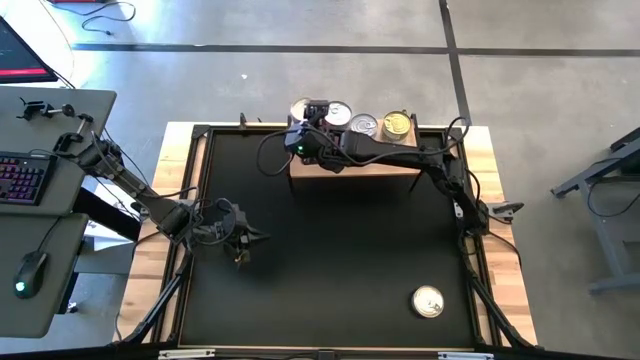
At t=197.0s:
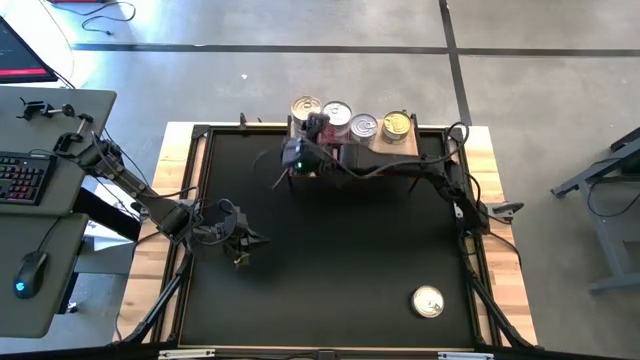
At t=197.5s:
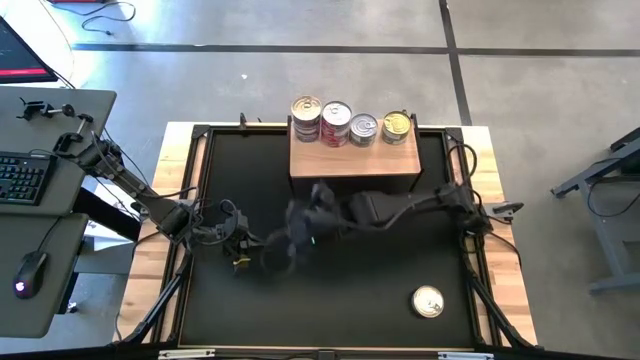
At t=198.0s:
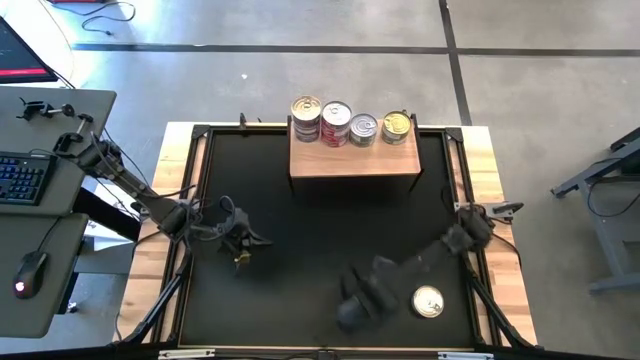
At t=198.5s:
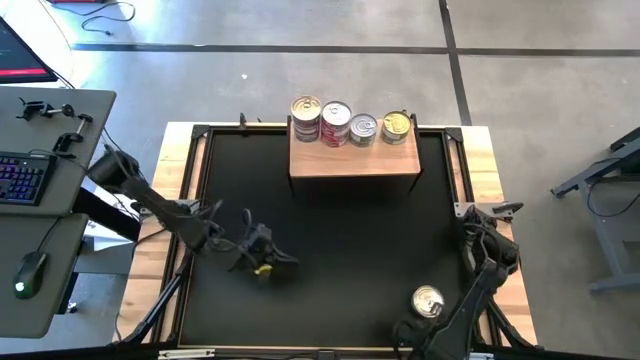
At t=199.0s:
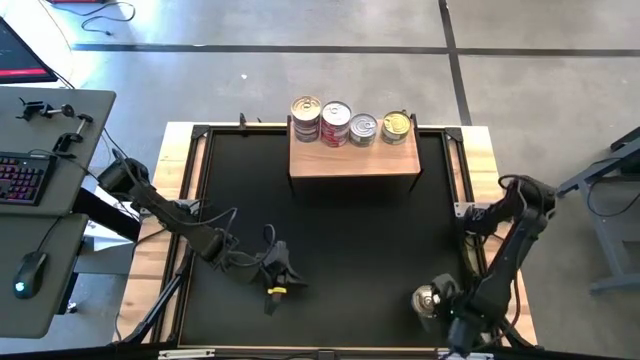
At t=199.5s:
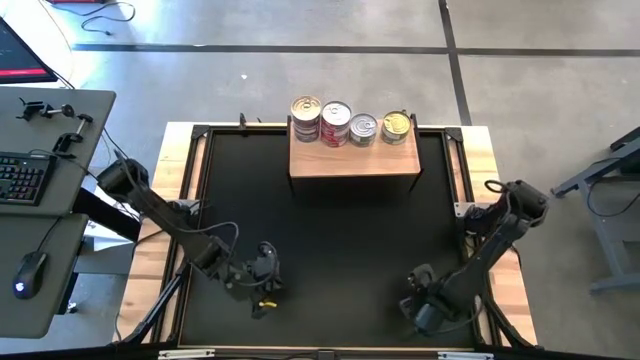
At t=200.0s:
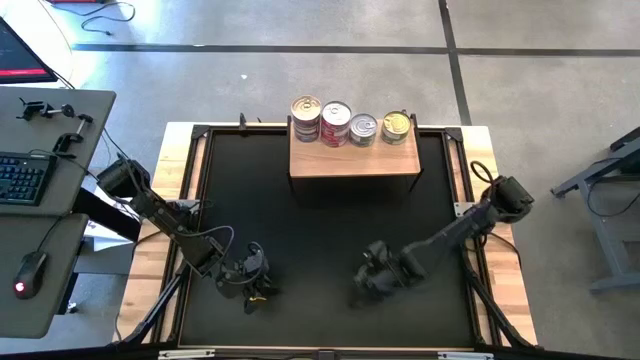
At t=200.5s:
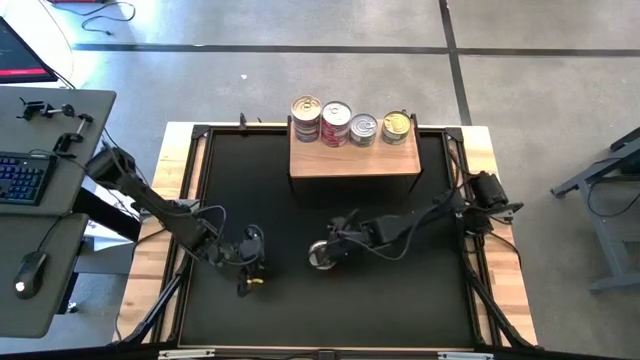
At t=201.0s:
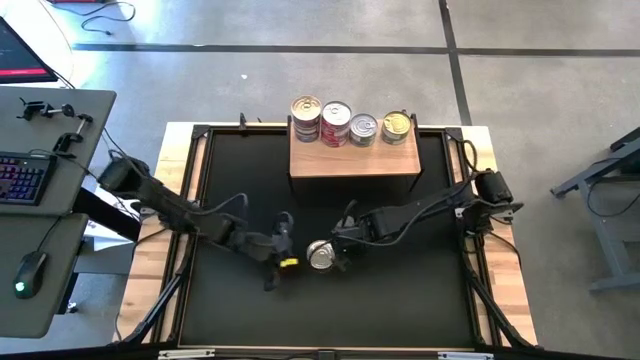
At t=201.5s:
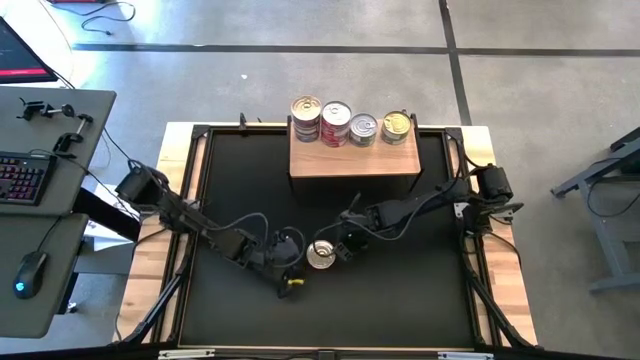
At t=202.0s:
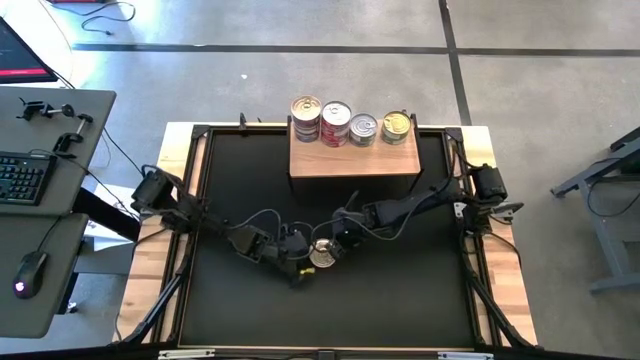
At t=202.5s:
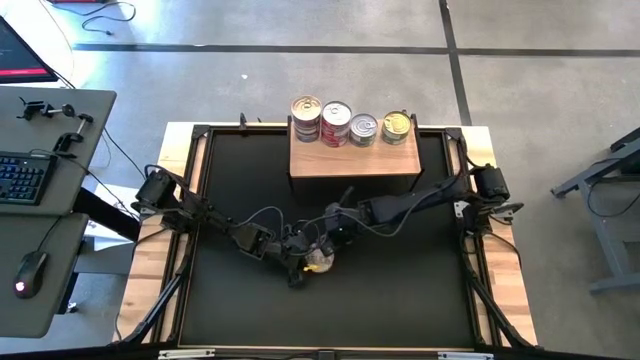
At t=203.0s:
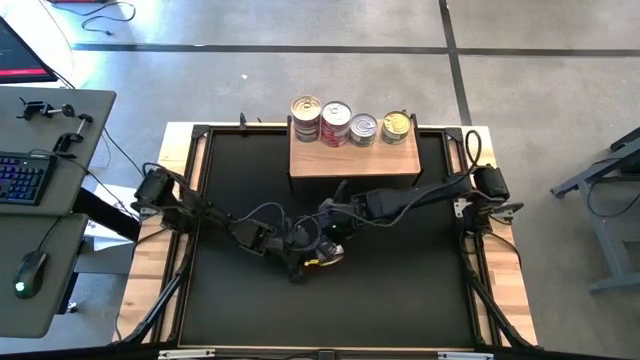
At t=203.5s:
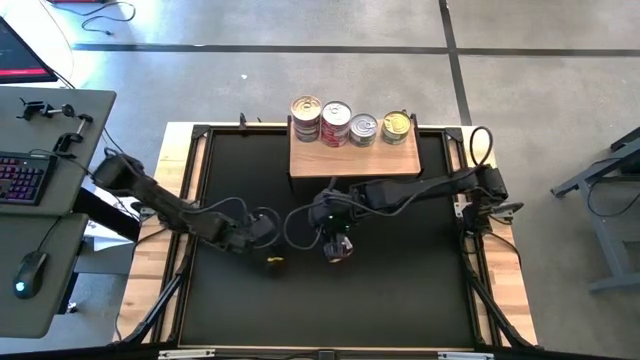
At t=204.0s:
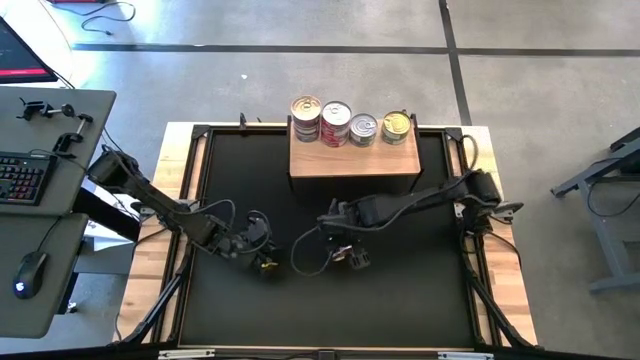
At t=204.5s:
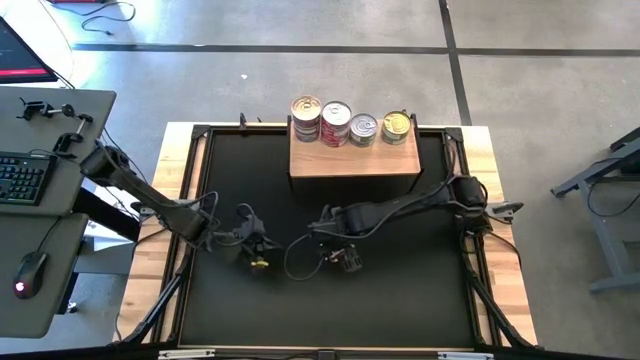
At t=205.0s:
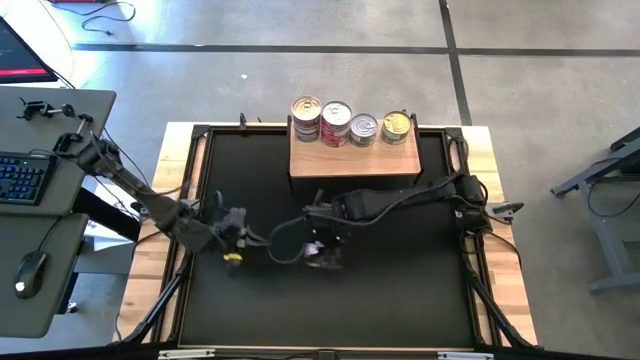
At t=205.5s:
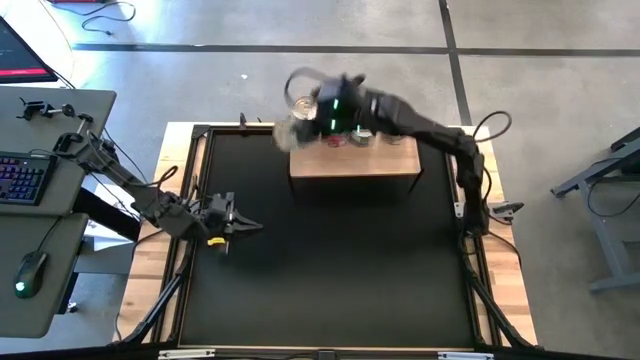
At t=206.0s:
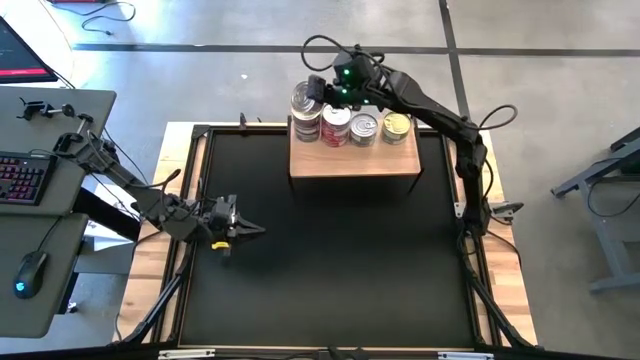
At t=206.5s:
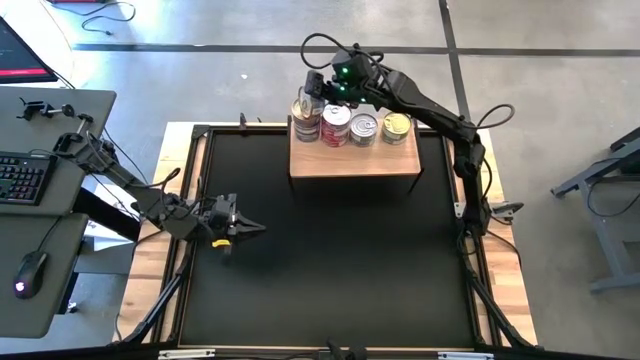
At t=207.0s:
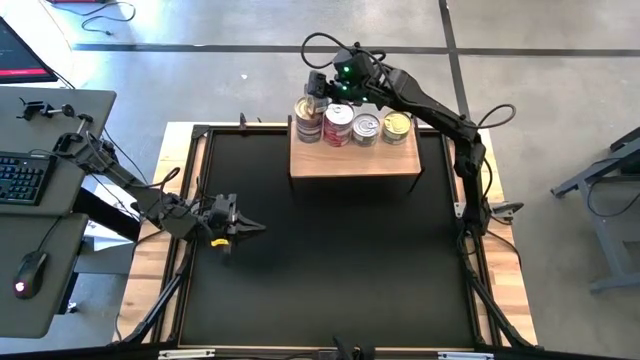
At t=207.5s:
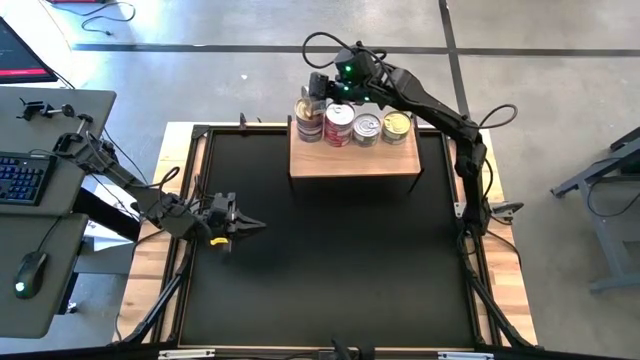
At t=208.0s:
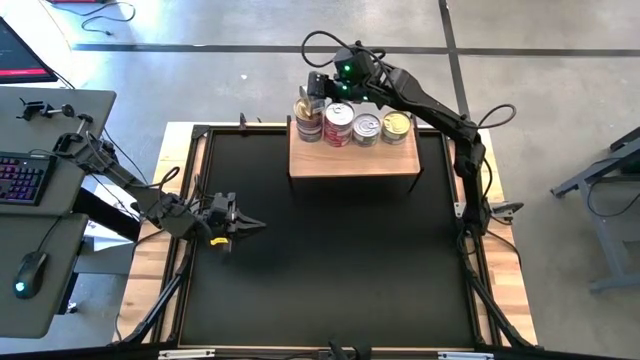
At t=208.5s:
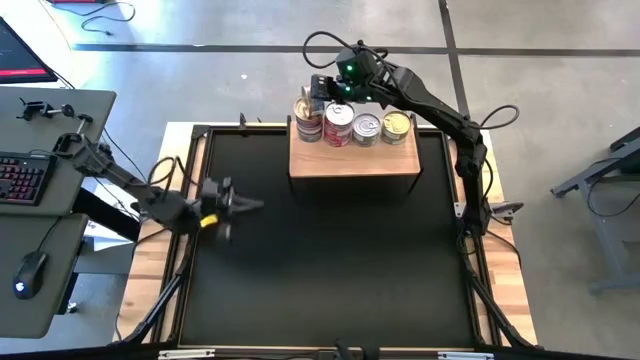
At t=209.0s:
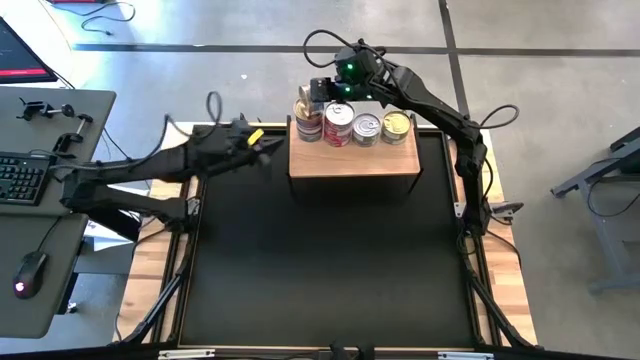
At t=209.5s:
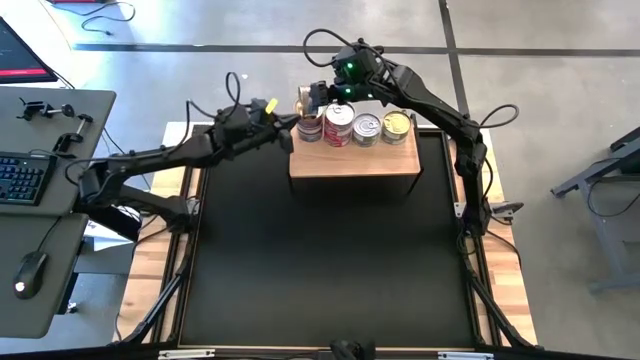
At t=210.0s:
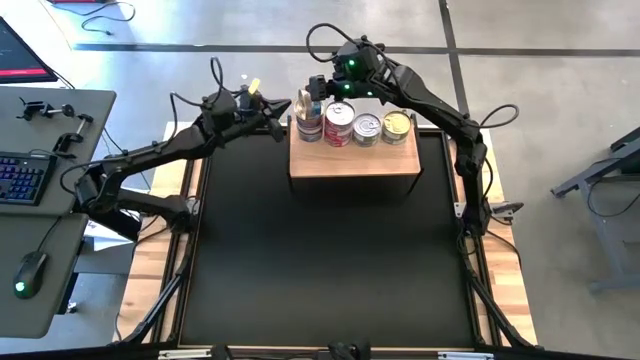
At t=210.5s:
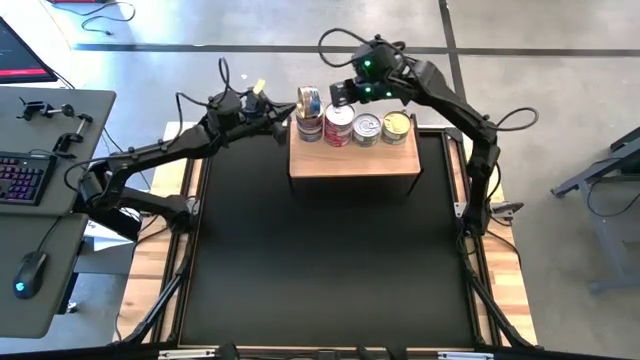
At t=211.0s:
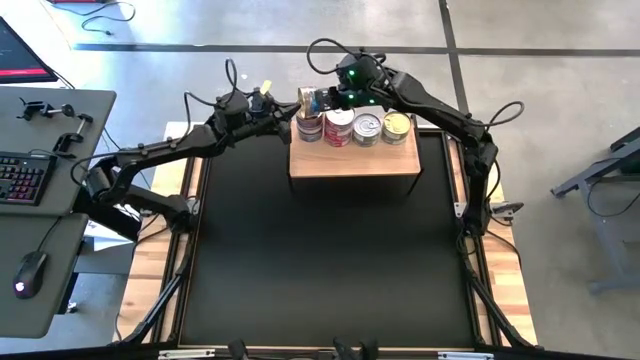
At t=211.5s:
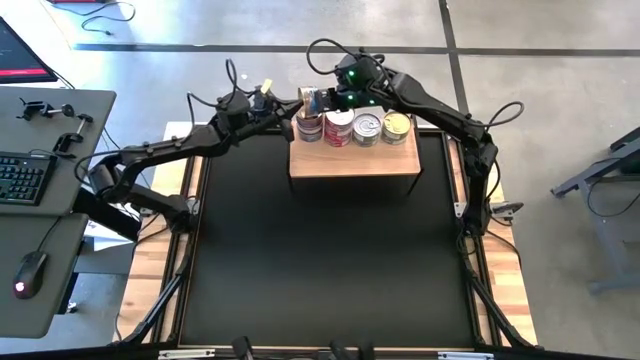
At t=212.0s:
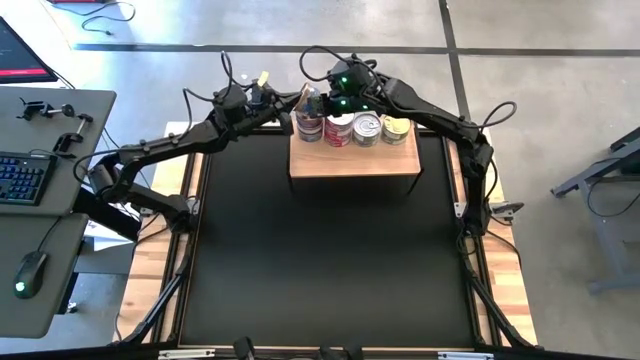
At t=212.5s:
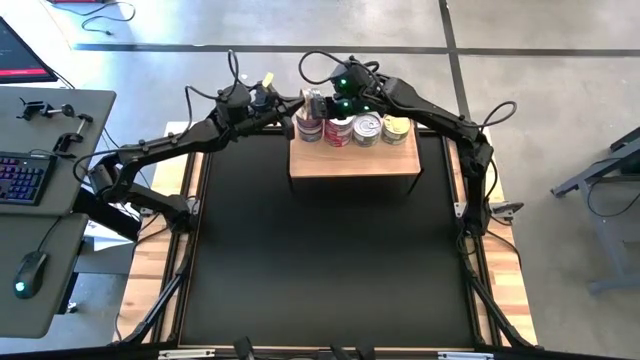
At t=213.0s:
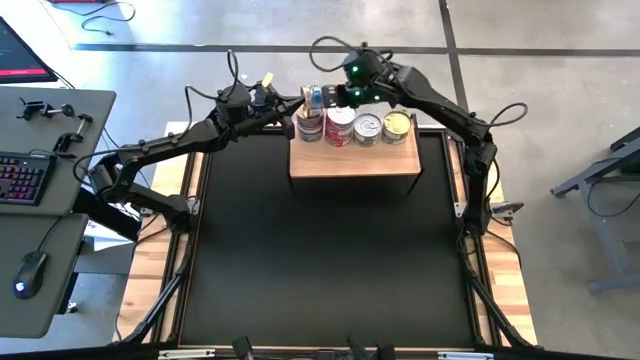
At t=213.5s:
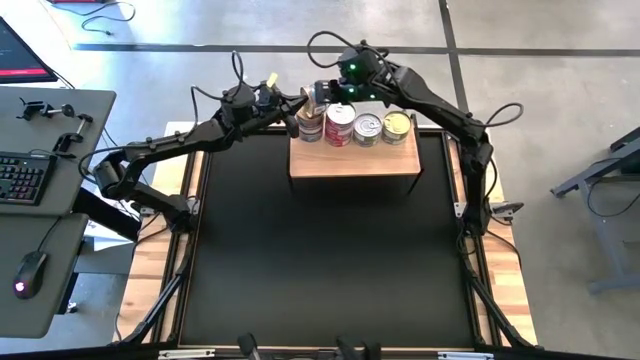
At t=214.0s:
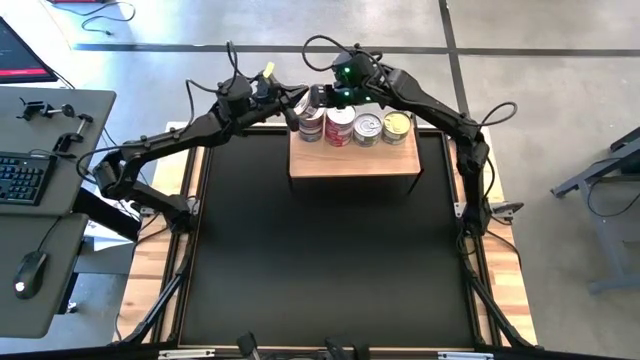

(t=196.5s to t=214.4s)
Task: Stack canned seafood by type on shelf
Stack the blue-pink can on top of the blue-pink tuna can on the shelf

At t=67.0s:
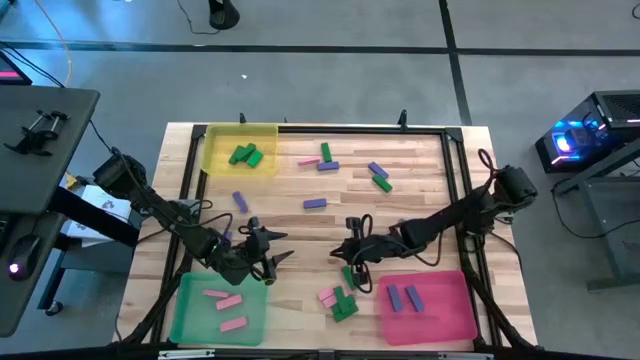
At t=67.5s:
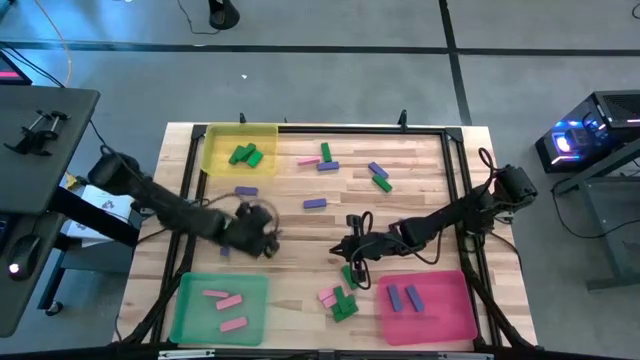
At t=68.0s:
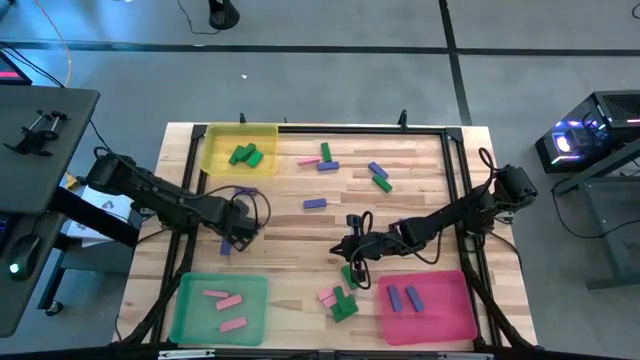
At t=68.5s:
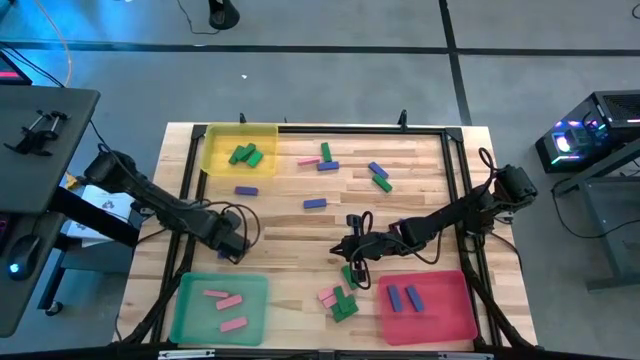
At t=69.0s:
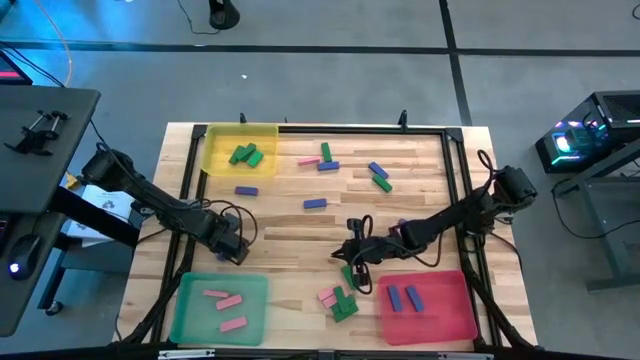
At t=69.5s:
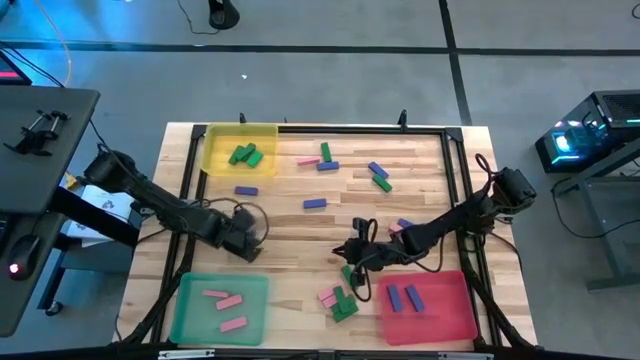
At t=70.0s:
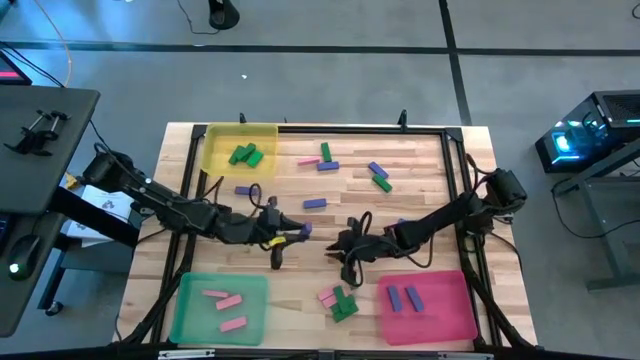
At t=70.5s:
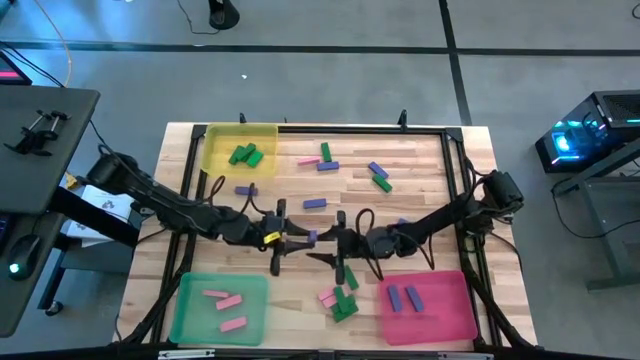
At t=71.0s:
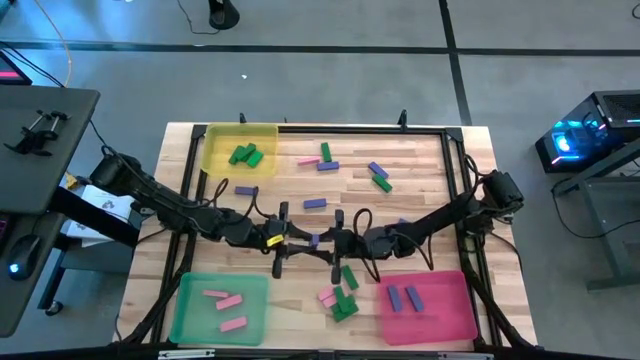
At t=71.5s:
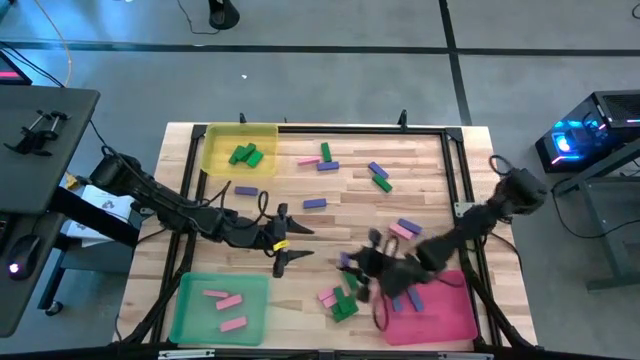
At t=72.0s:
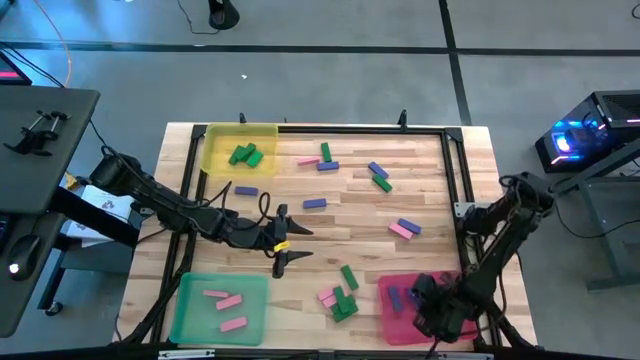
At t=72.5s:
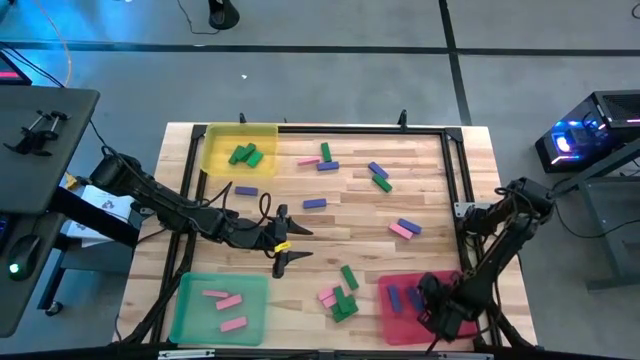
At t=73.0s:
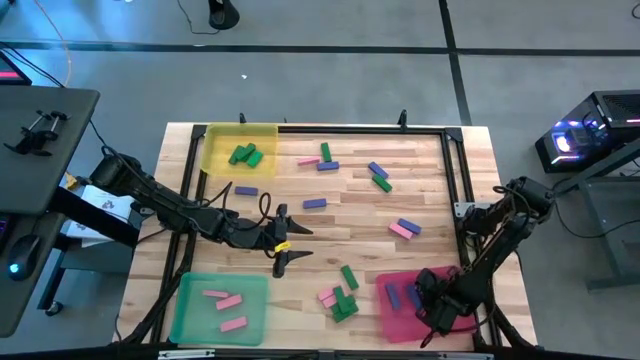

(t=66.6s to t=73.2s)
Task: Sort blocks
Put the violet block into the pink bin
